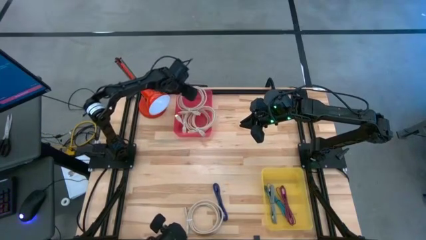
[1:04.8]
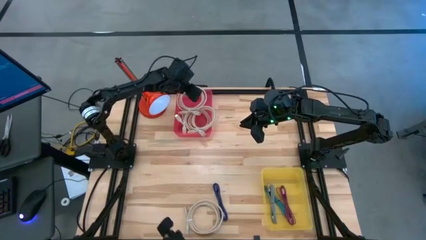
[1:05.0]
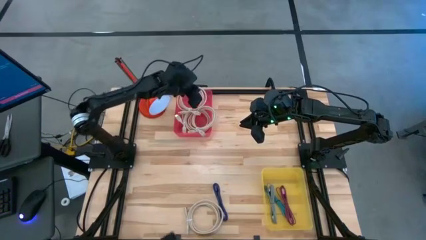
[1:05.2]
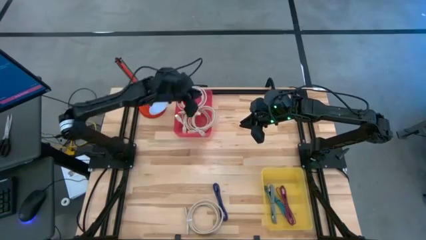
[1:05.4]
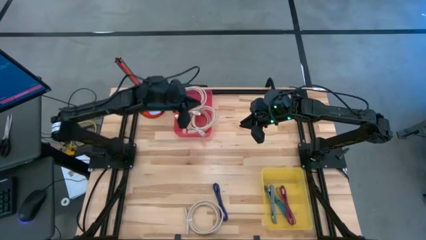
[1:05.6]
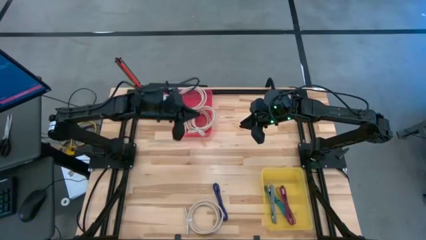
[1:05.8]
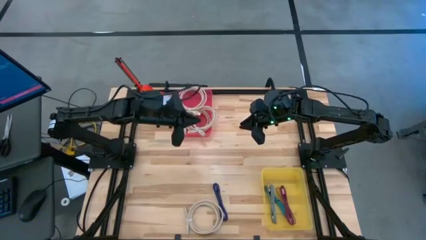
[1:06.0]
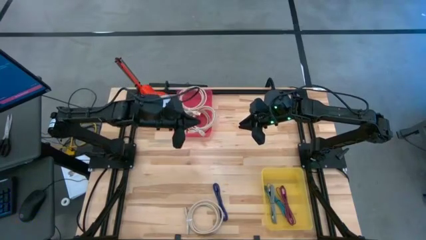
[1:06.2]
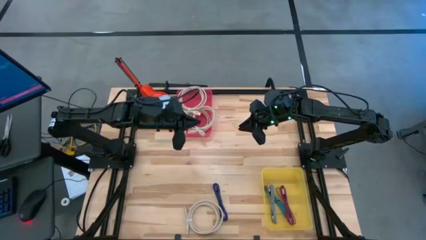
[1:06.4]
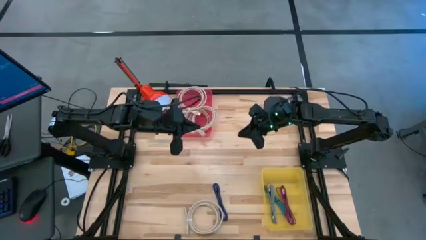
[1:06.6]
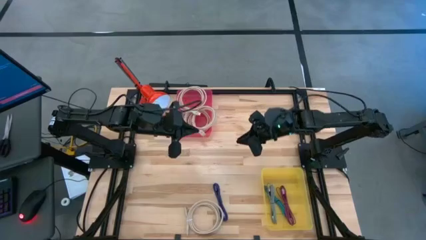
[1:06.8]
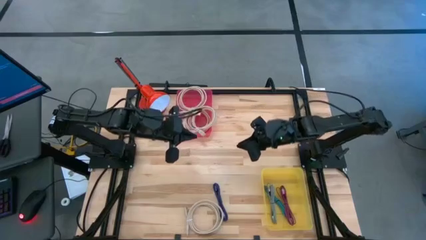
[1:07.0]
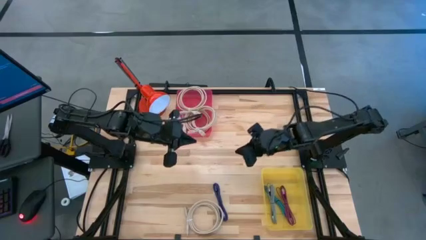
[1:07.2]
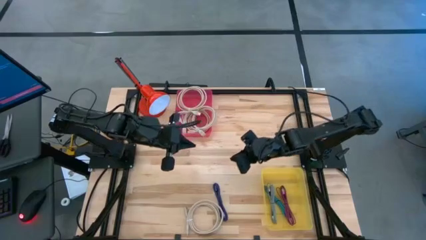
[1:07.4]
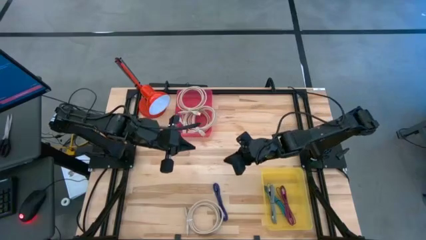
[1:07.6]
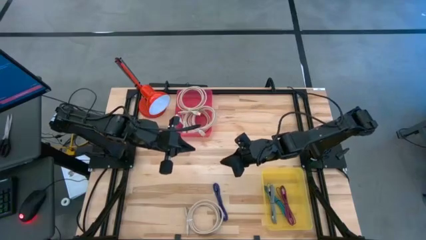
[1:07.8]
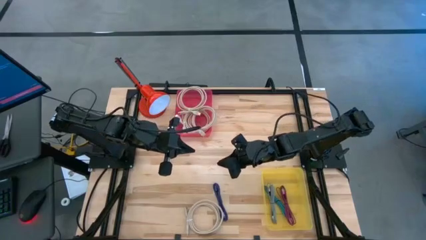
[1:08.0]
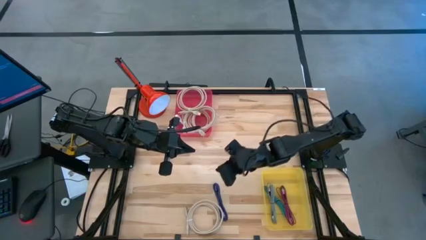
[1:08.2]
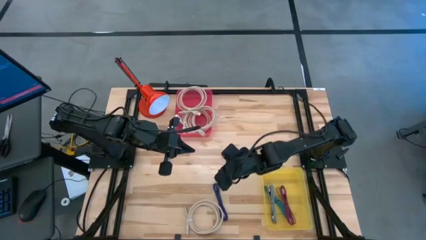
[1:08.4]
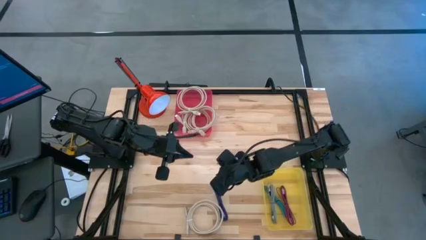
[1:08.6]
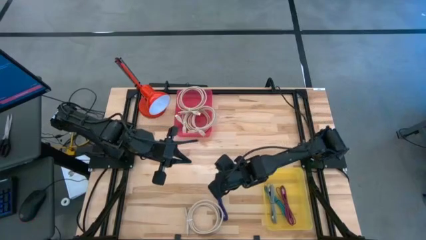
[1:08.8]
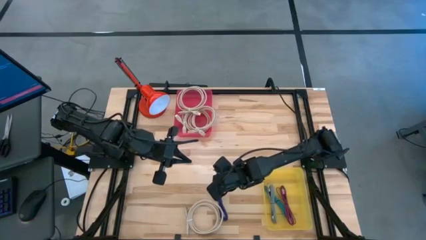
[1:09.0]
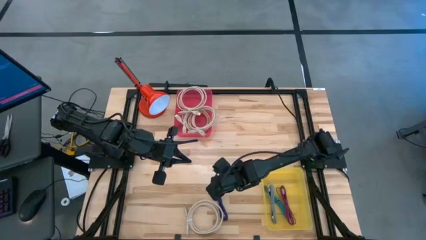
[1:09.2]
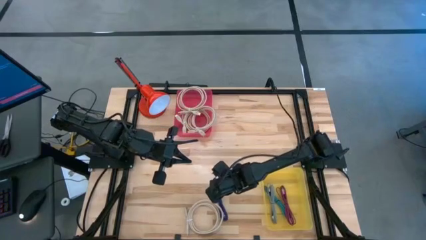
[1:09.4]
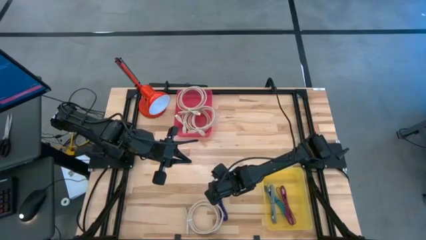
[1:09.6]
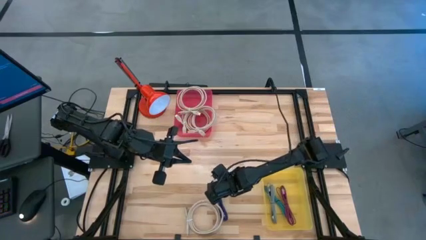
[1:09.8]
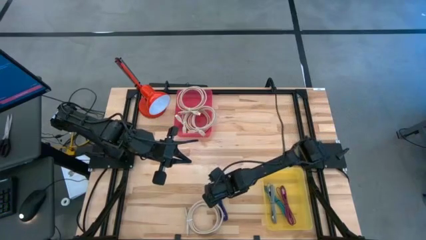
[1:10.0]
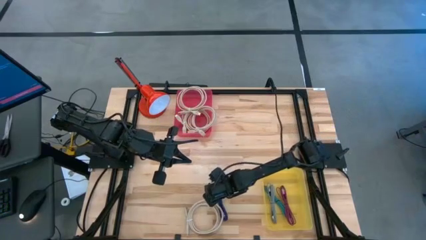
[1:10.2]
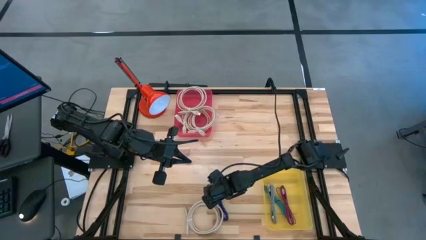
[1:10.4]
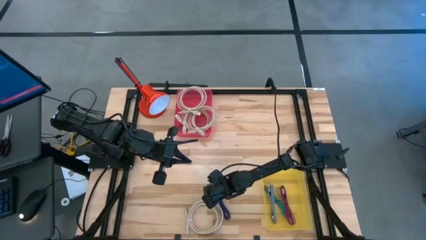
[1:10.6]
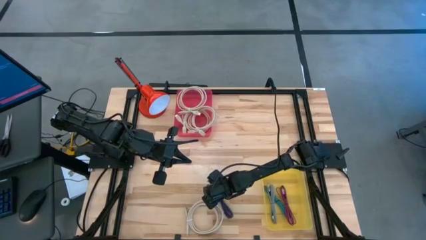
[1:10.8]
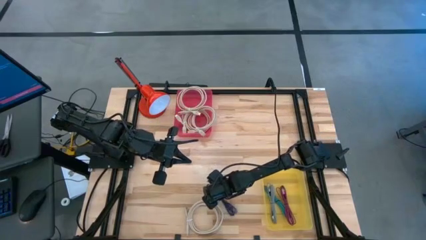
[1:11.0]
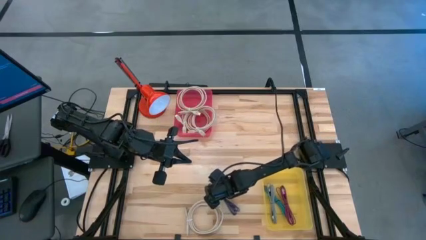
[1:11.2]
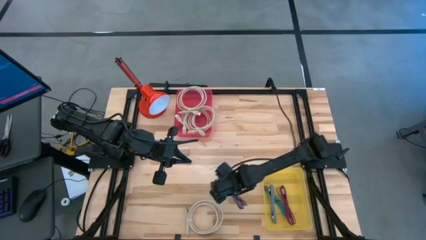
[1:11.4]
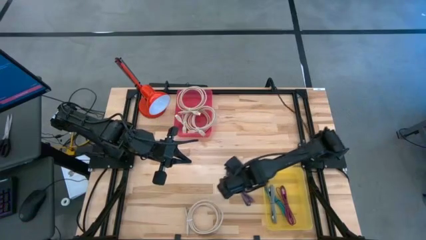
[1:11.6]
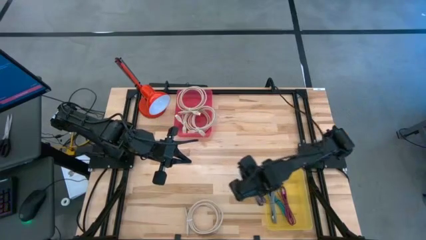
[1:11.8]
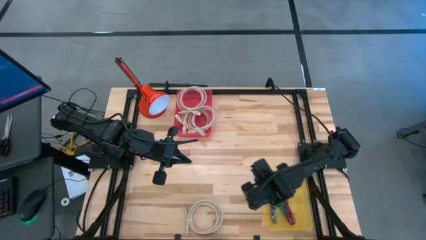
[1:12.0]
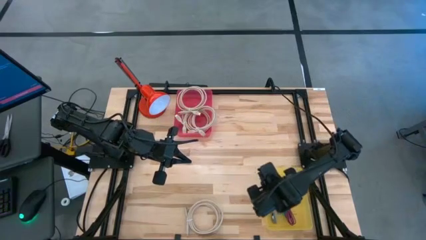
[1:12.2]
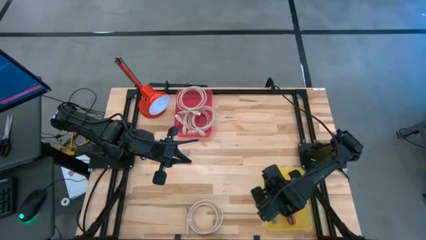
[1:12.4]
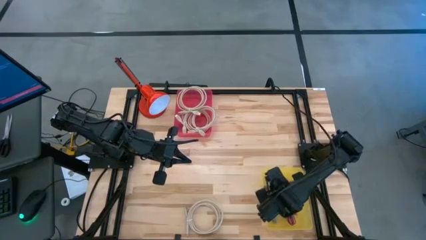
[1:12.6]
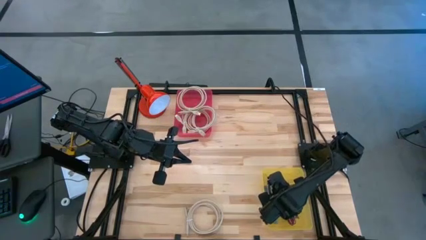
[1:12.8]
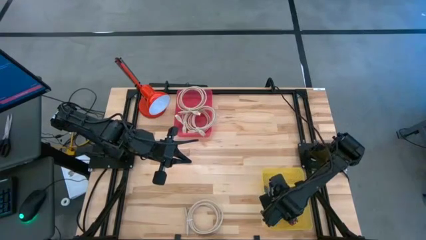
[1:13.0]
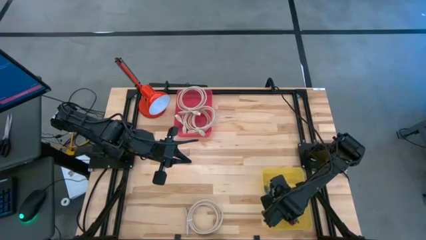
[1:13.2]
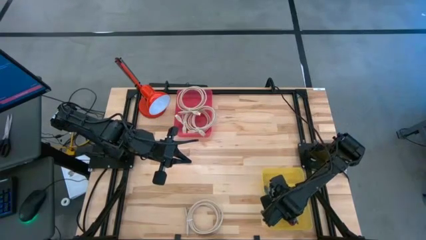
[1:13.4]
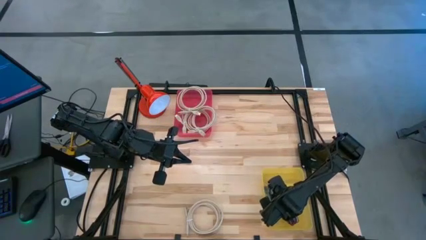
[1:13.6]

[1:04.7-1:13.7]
Task: Pick & Place USB Port
Put the dark blue charger cable into the yellow bin

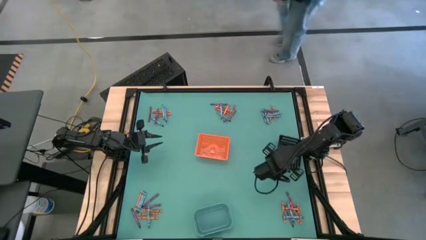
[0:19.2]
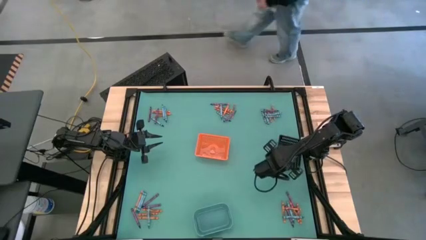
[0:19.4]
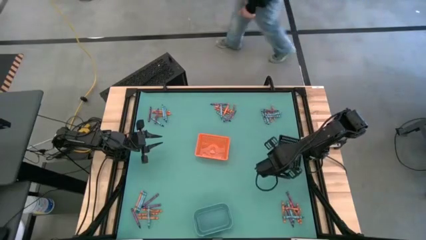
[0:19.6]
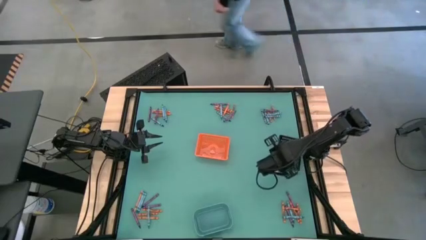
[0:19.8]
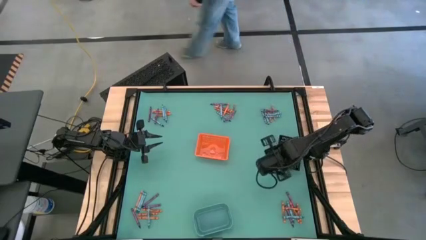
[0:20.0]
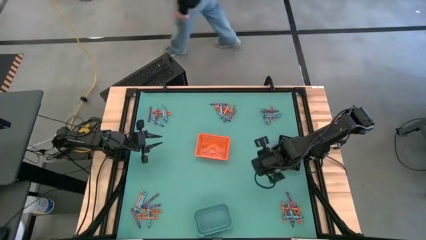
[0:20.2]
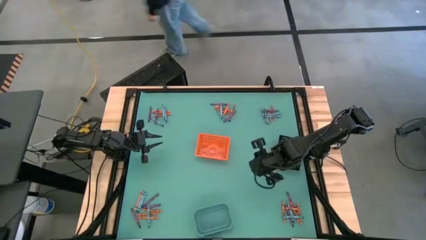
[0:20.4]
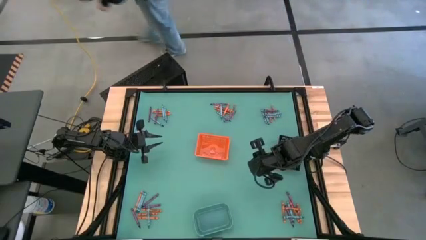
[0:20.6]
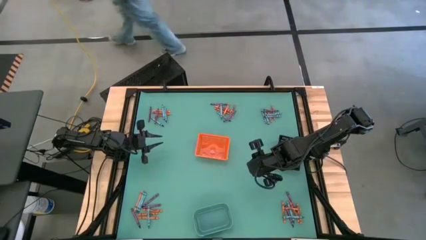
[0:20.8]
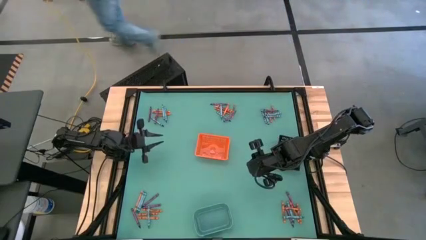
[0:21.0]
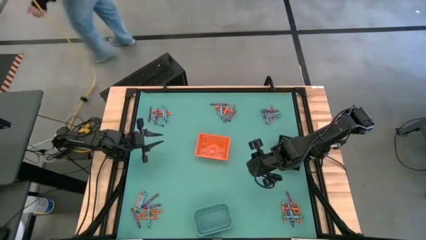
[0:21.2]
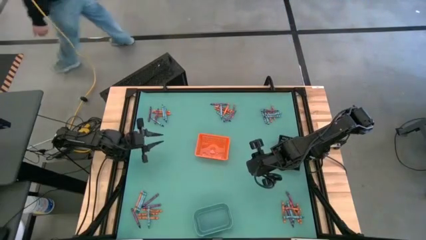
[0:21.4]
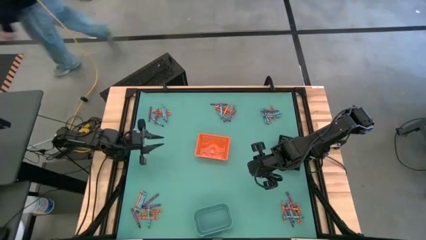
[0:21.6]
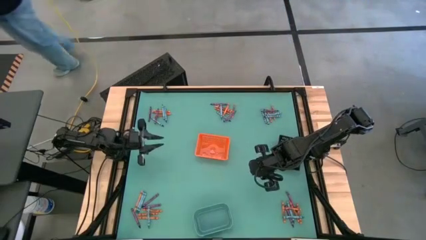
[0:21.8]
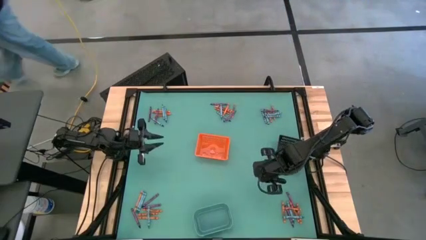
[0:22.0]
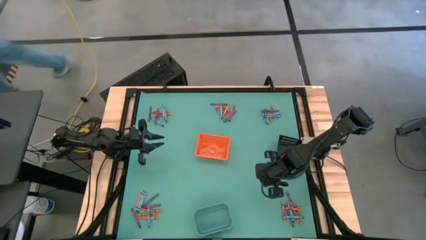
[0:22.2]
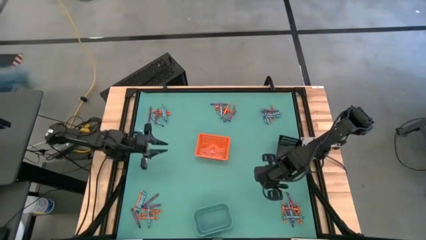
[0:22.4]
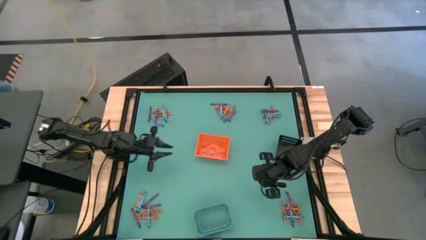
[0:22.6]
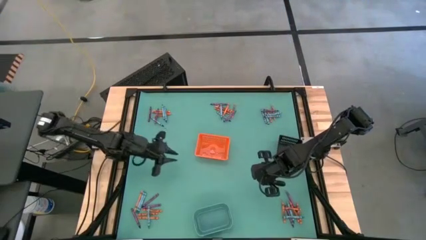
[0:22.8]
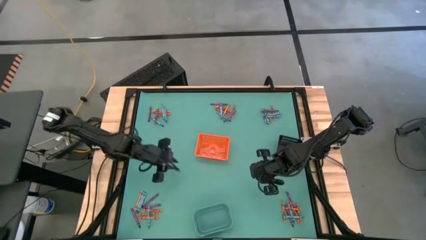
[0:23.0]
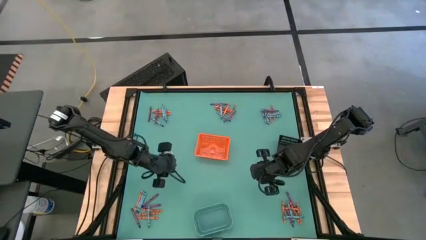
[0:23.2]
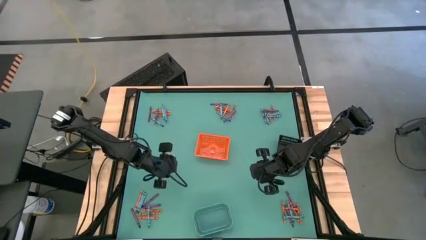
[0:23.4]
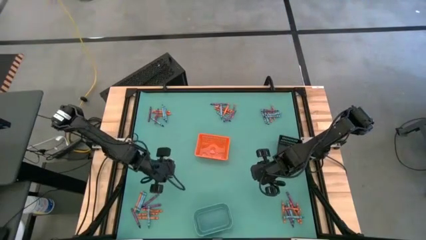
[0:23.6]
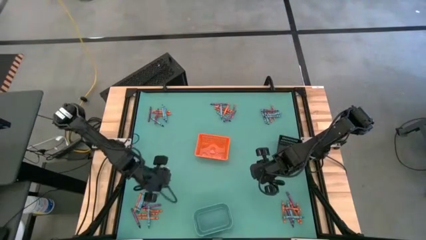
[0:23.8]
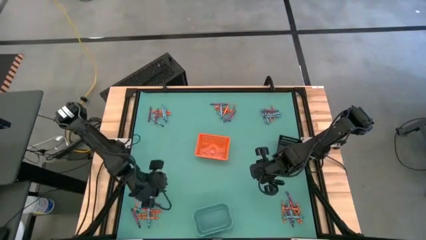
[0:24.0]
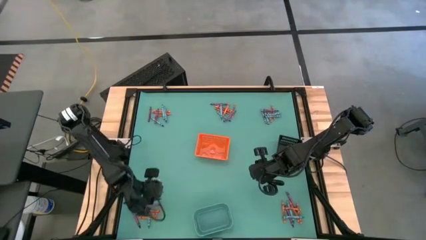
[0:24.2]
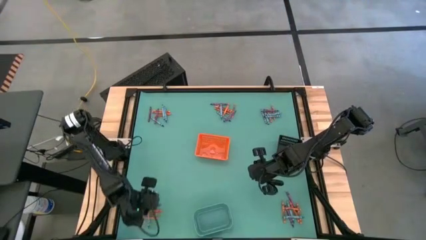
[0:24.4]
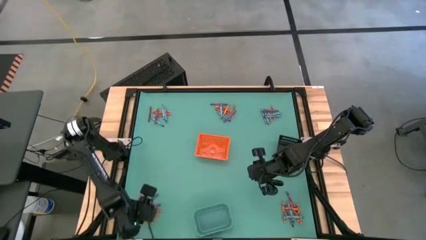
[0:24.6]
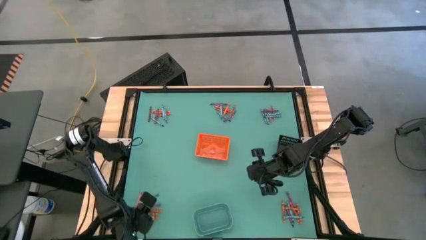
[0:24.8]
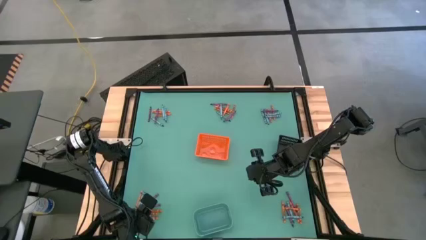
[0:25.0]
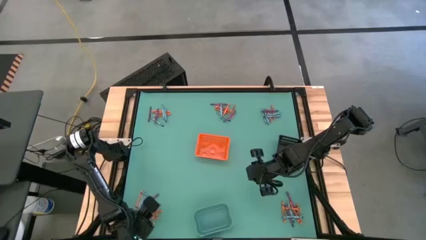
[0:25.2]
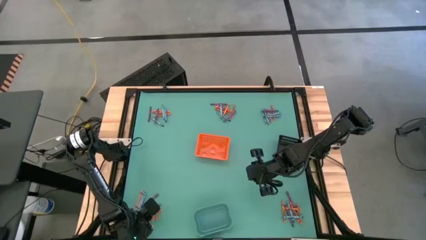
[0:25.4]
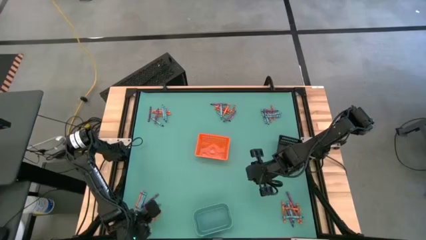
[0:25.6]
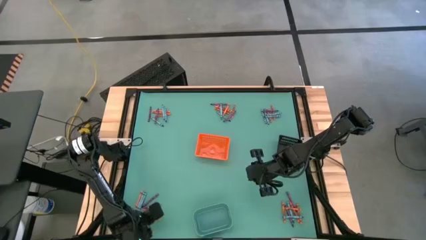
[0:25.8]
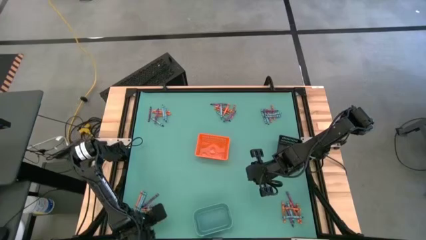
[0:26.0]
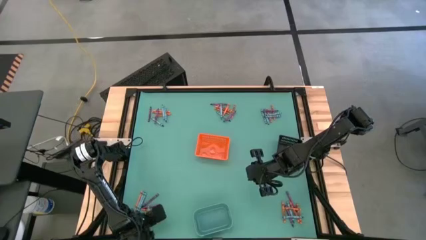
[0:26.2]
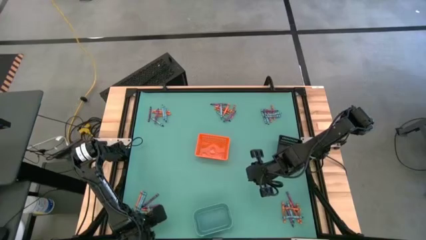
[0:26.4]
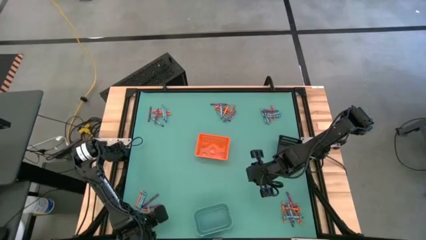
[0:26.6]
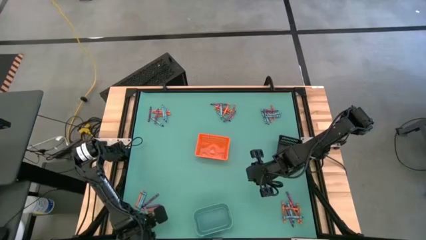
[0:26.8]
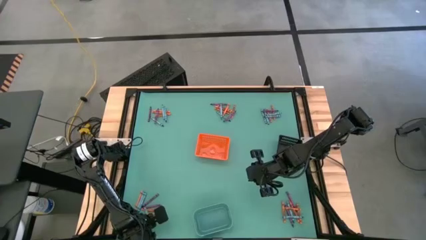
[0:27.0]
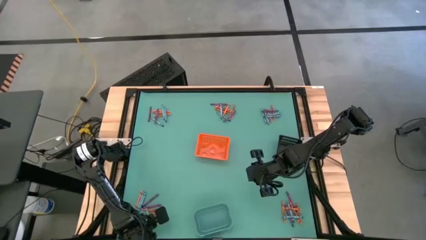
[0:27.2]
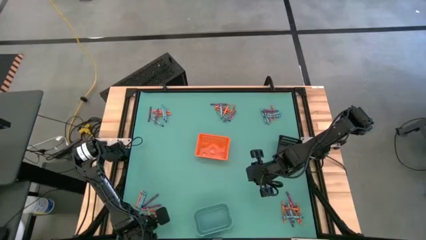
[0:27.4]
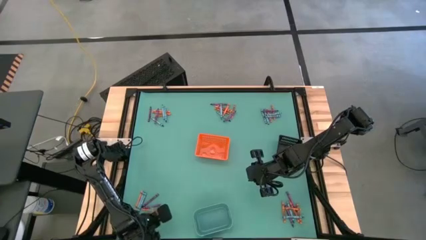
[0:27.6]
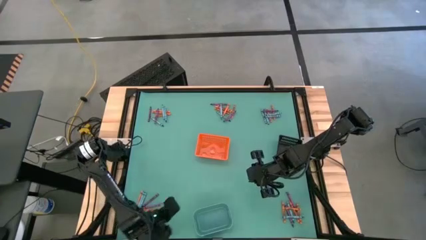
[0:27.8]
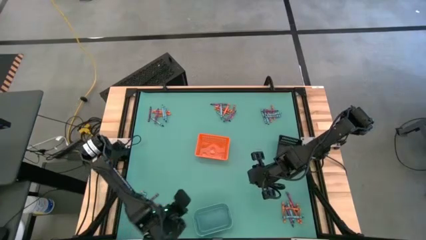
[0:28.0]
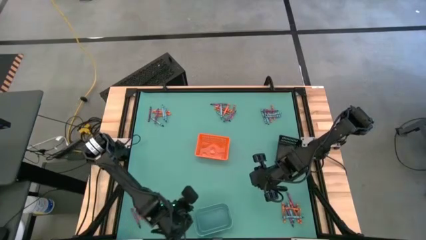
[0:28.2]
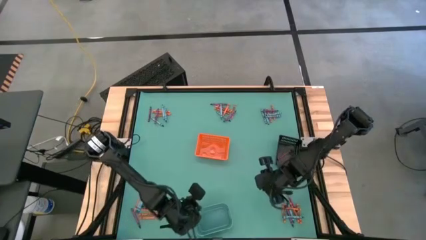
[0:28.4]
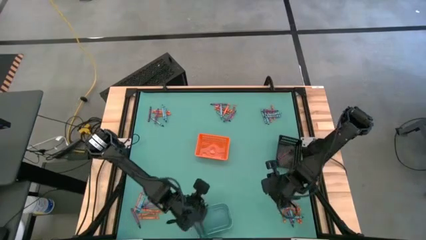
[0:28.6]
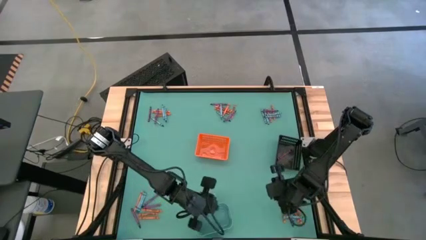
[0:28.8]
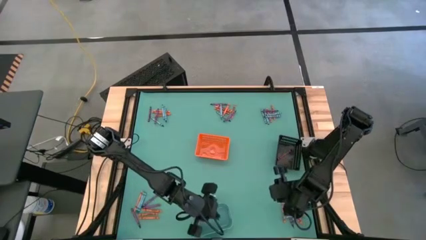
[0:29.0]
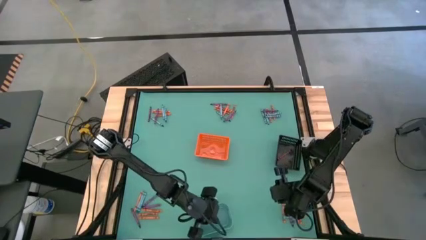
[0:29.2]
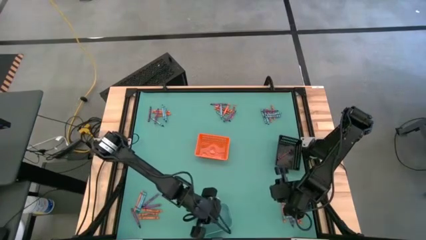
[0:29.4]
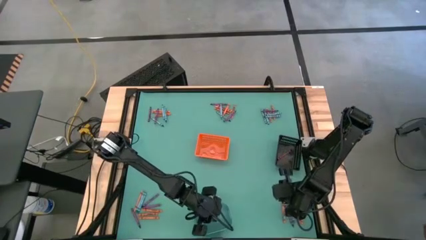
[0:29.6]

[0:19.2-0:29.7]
Task: Sort crayons
Put the blue crayon into the blue bin
